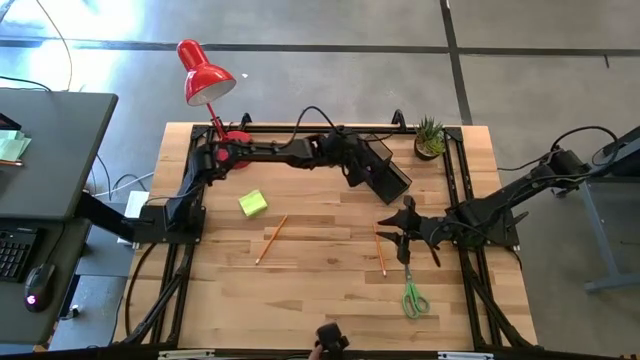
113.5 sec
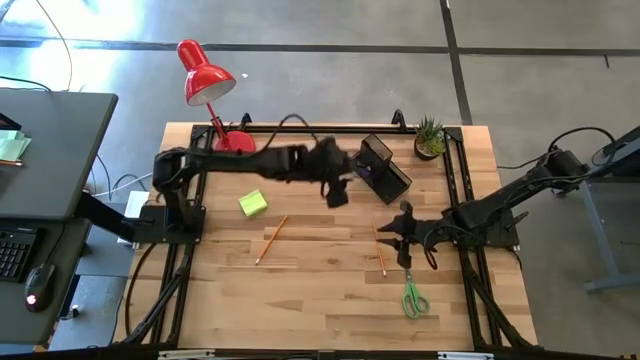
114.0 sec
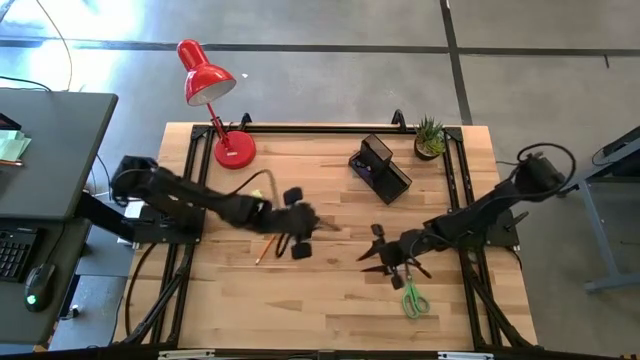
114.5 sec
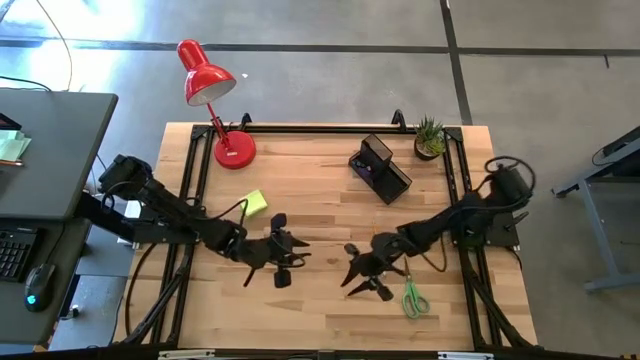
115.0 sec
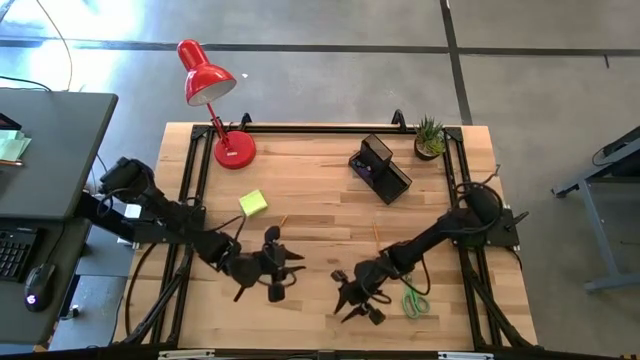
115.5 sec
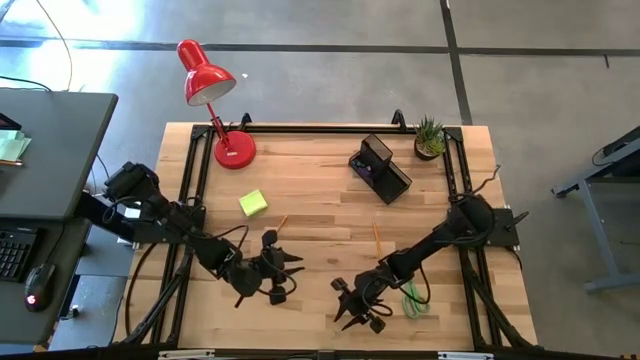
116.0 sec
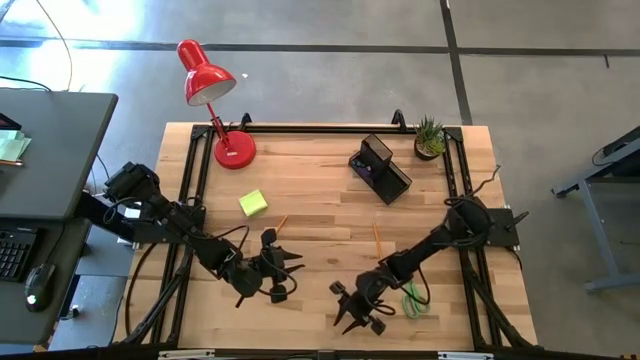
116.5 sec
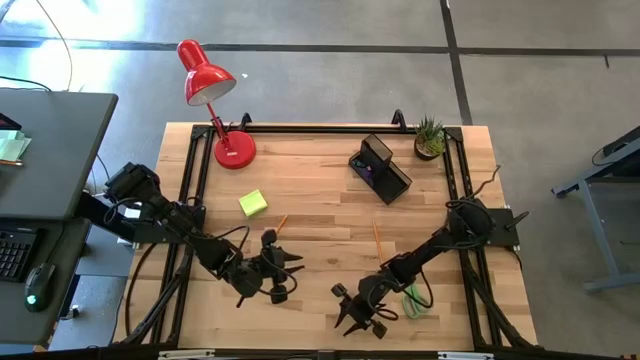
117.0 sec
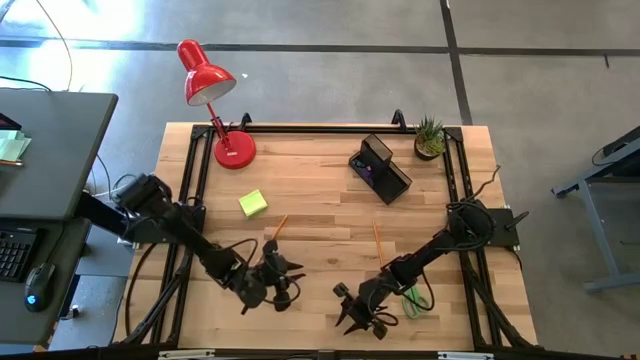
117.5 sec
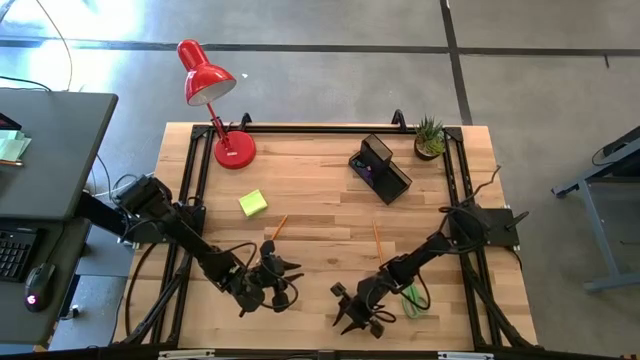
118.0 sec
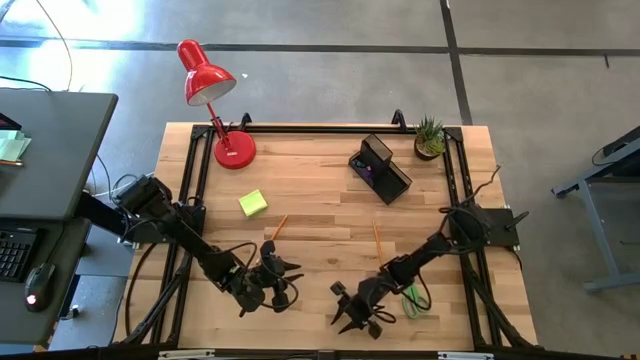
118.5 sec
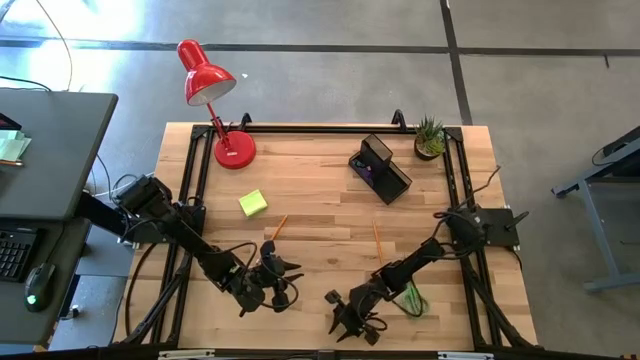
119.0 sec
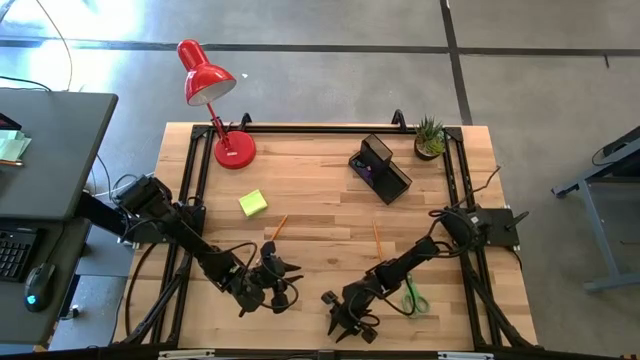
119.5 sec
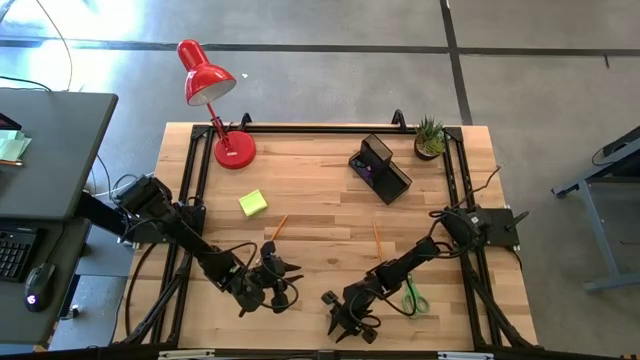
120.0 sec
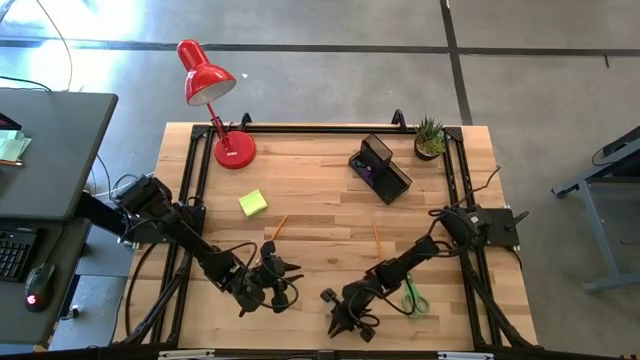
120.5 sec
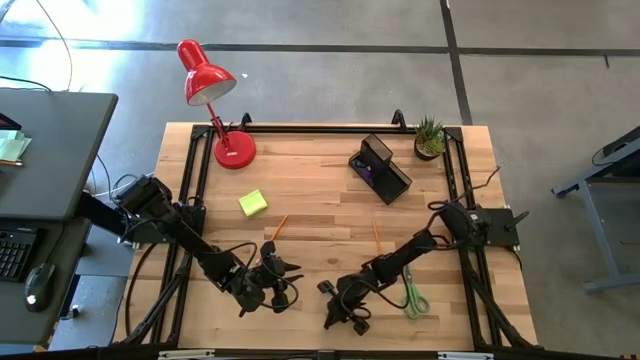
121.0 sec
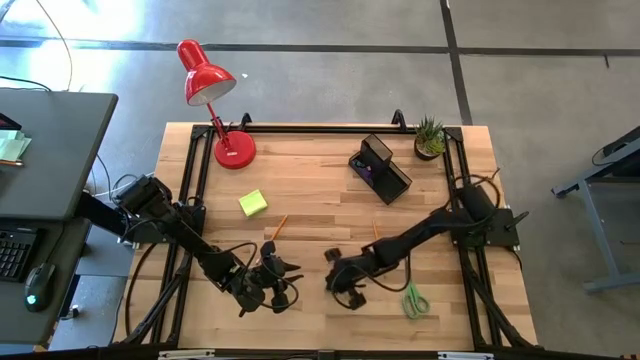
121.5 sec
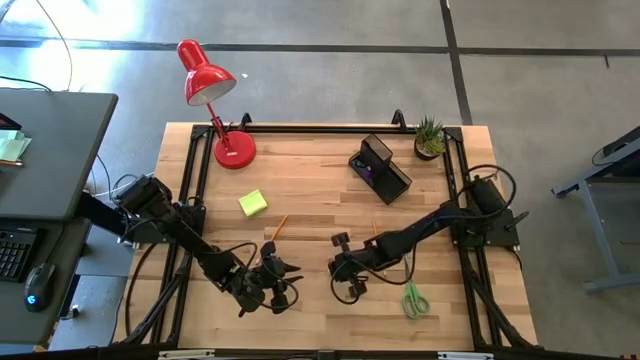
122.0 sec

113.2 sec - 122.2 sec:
Task: Pick and place office supplies into organizer
Put the light green binder clip into the black desk organizer

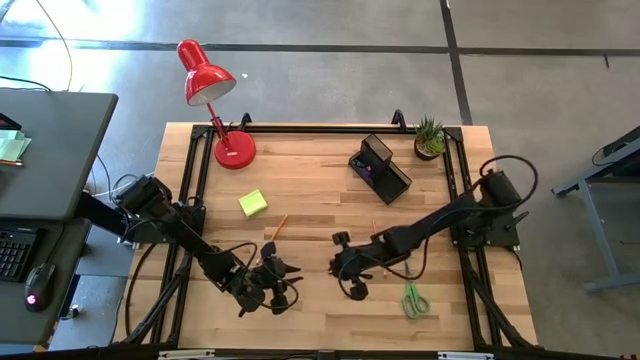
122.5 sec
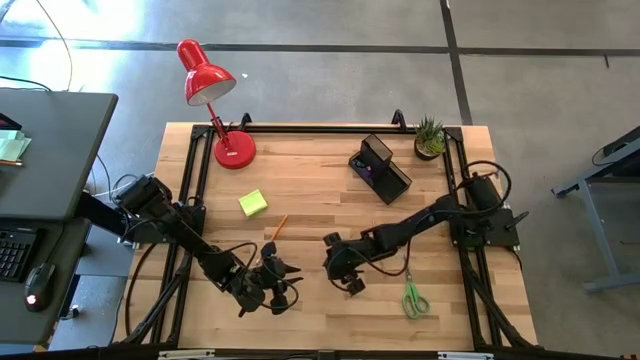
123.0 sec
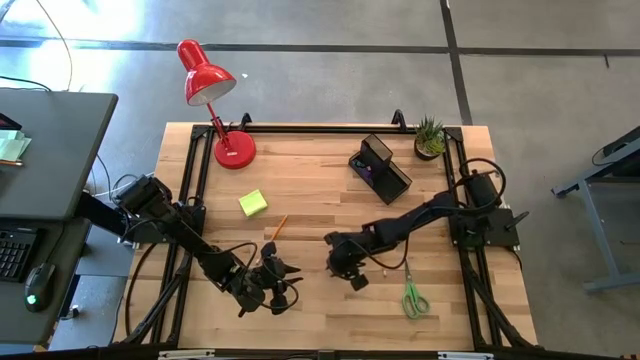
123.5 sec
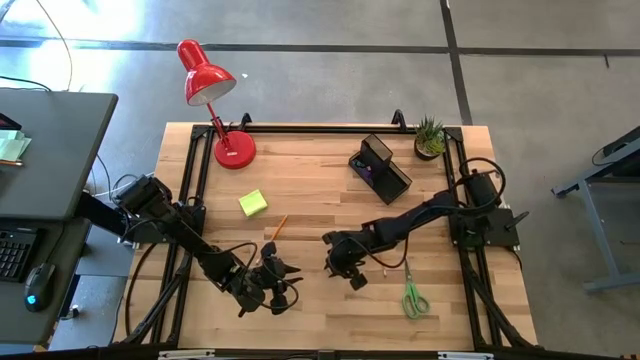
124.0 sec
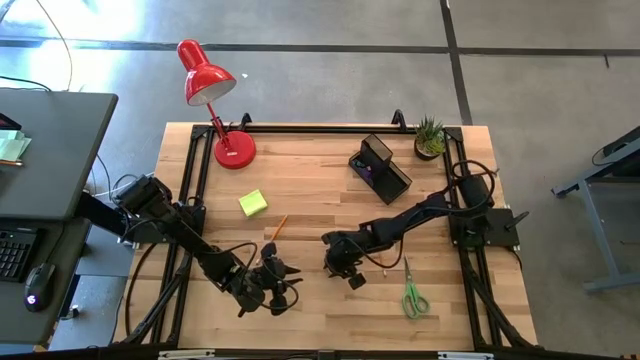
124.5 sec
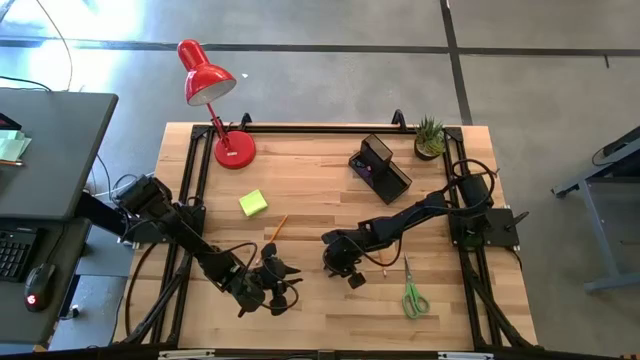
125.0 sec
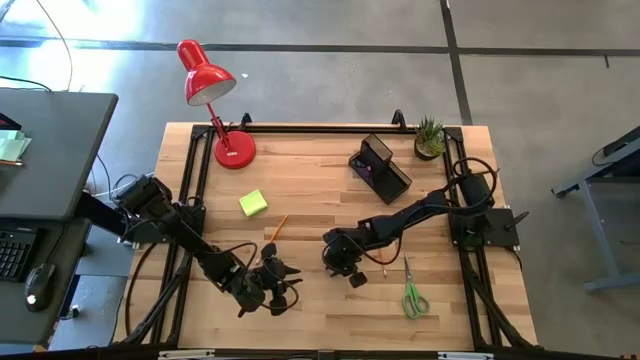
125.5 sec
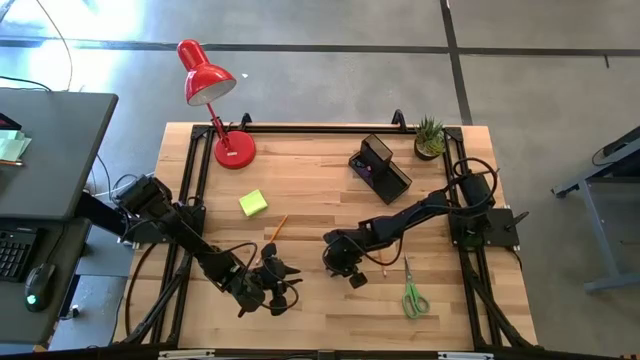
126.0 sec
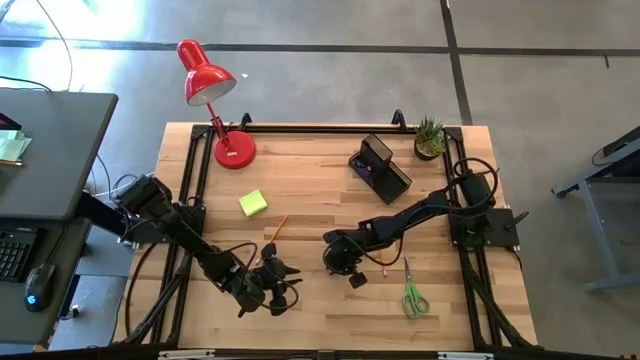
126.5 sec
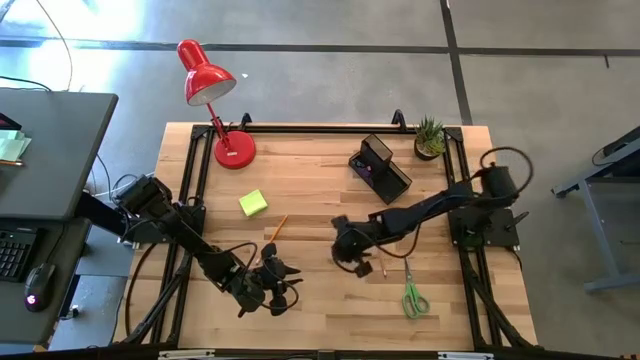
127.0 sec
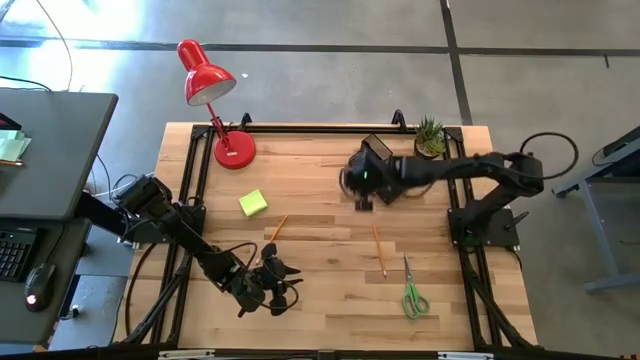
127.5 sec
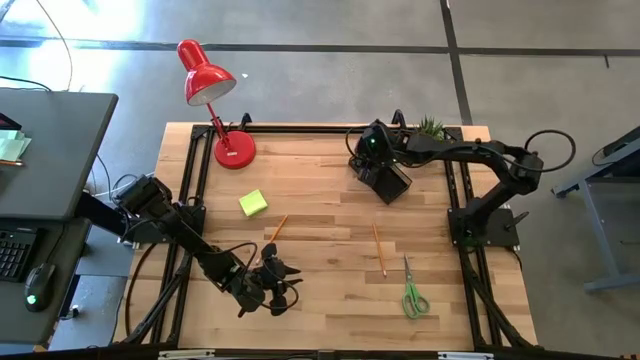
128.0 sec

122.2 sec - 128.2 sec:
Put the light green binder clip into the black desk organizer

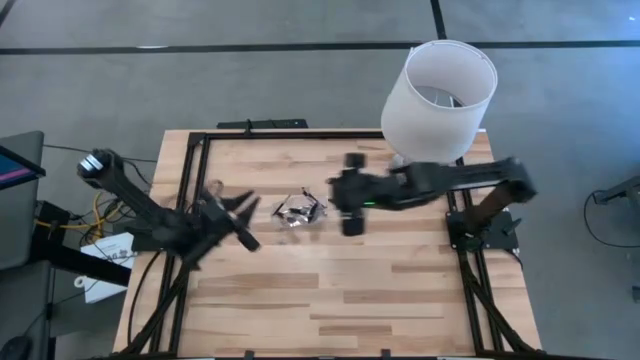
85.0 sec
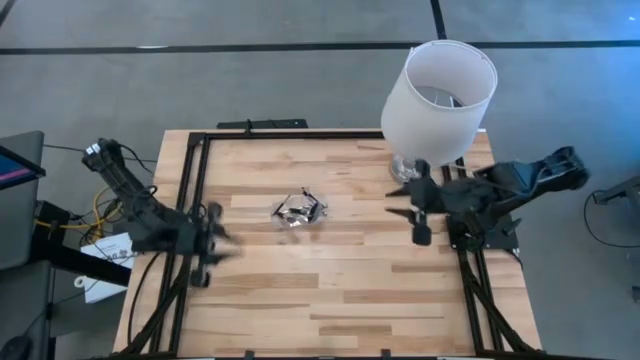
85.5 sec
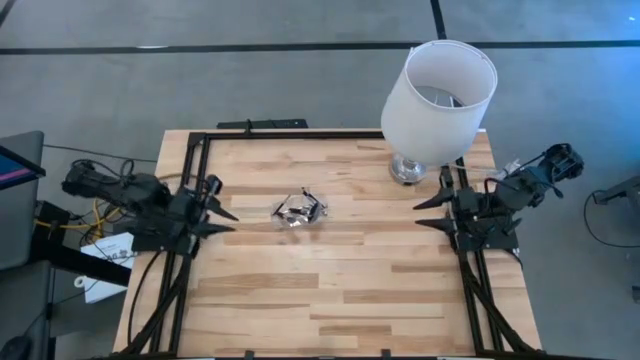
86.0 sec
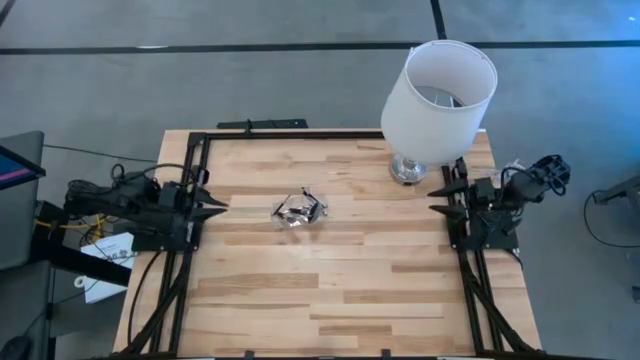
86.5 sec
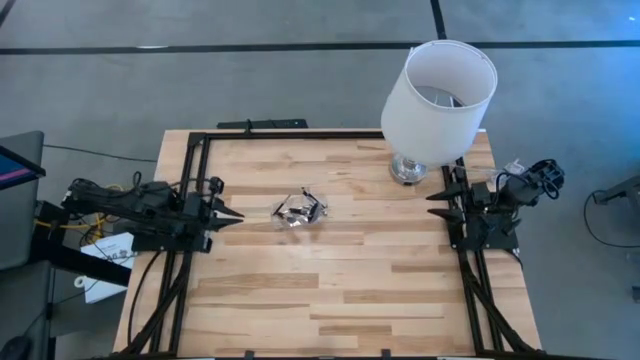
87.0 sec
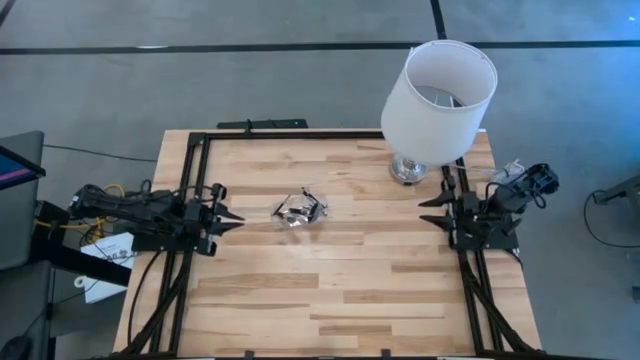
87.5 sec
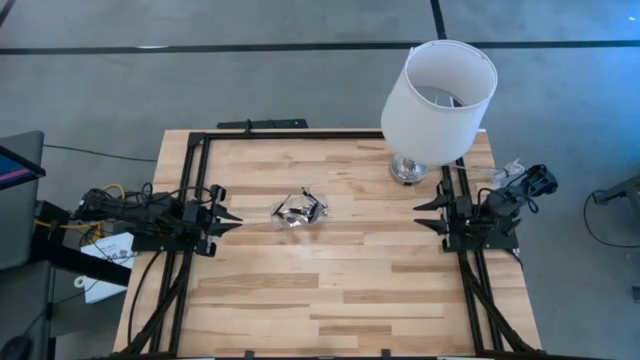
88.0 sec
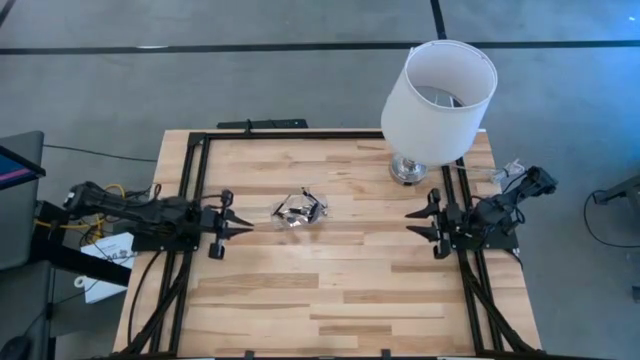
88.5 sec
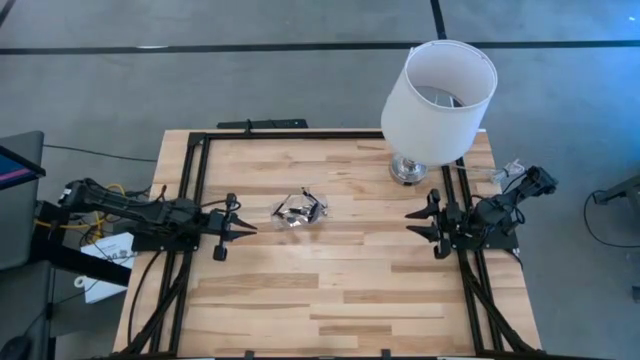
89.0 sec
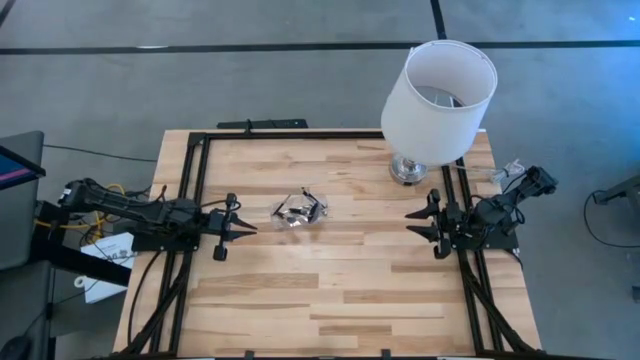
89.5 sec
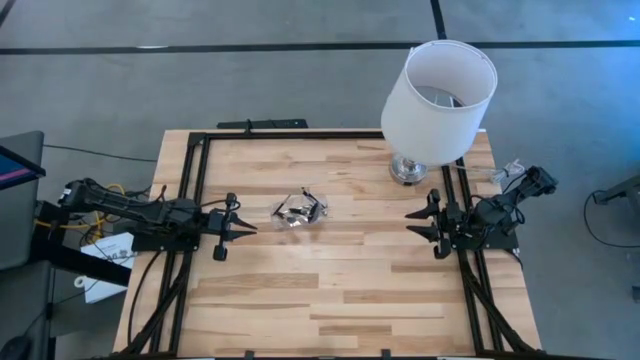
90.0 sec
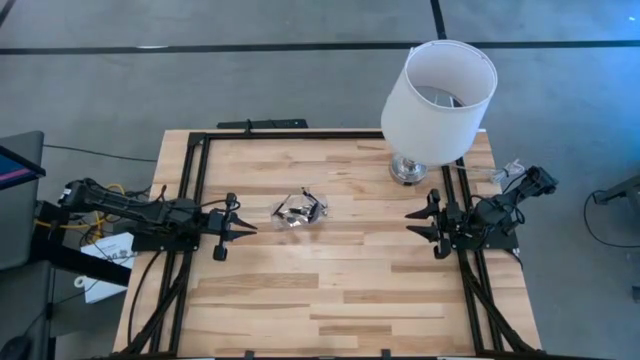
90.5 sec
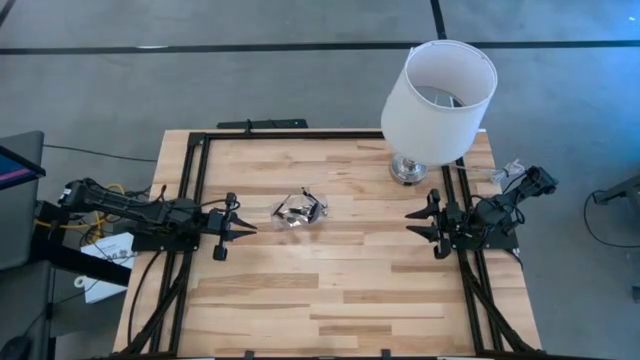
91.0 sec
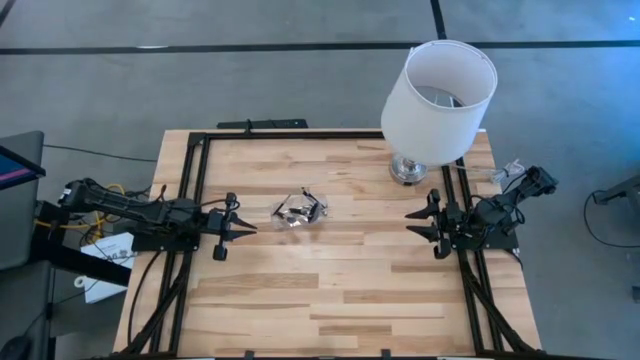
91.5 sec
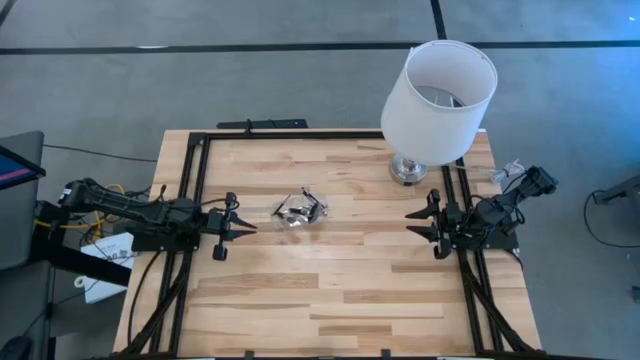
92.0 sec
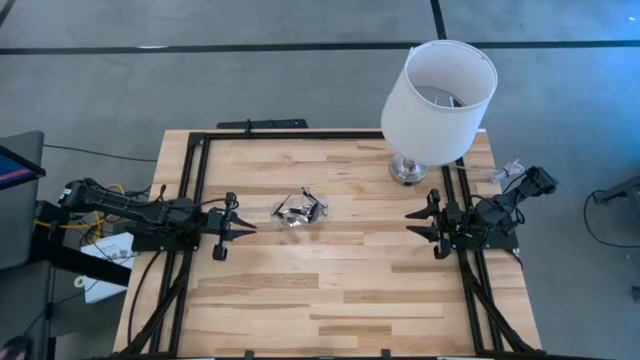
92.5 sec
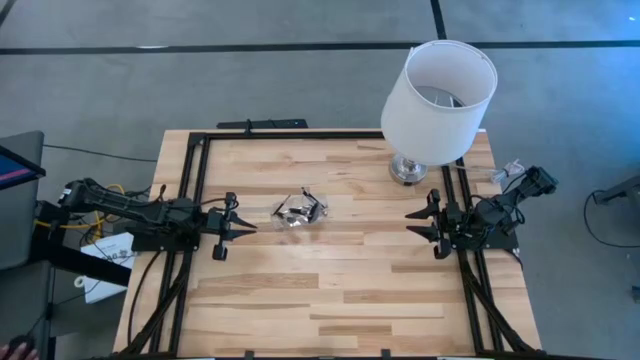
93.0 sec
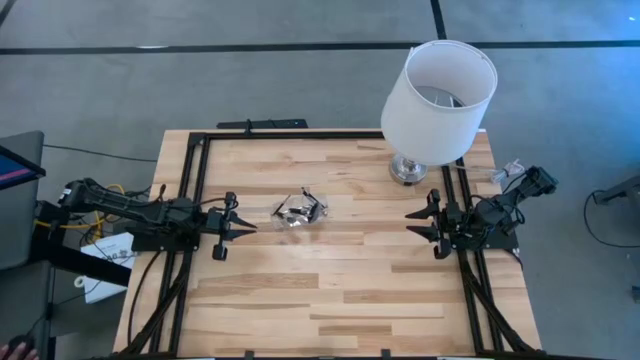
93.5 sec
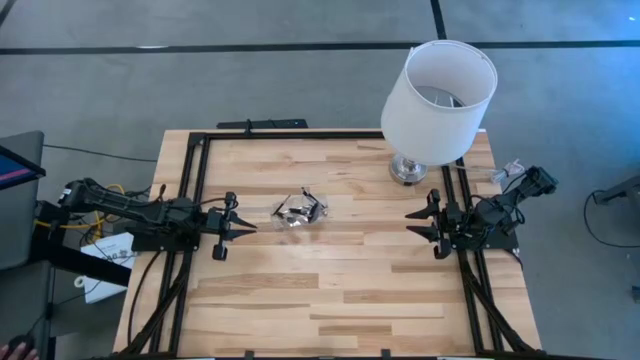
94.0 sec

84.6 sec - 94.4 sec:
Task: Pick & Place Makeup Supplies
Return to Home Position
